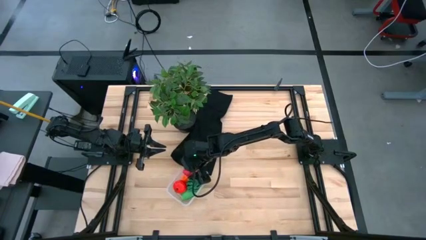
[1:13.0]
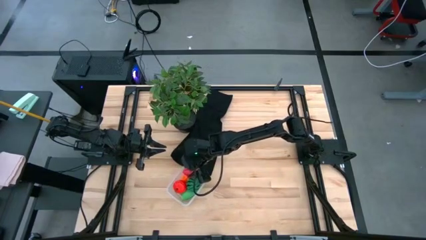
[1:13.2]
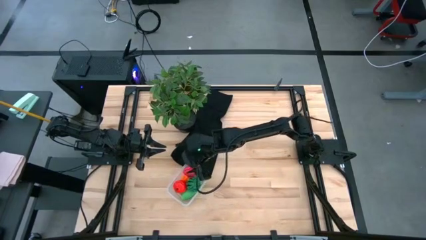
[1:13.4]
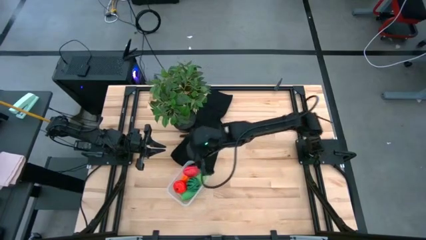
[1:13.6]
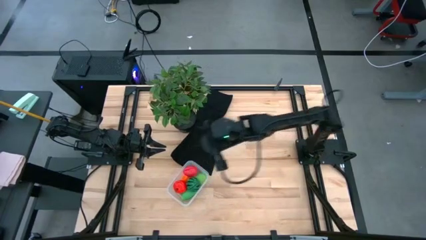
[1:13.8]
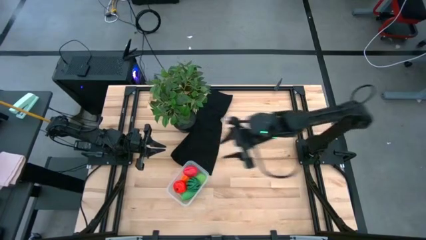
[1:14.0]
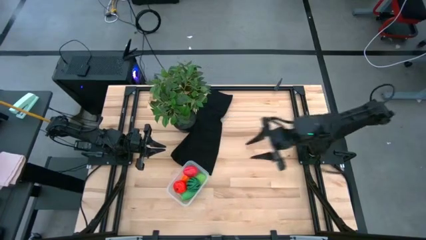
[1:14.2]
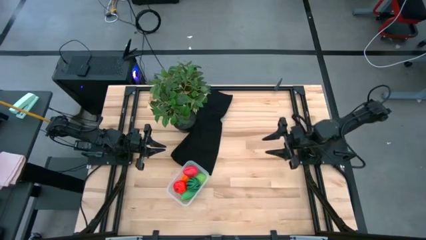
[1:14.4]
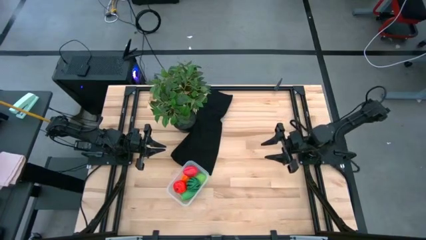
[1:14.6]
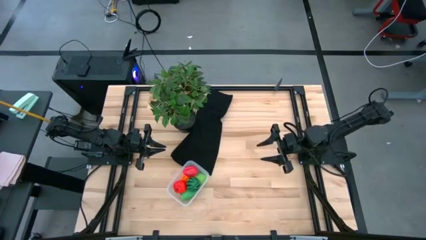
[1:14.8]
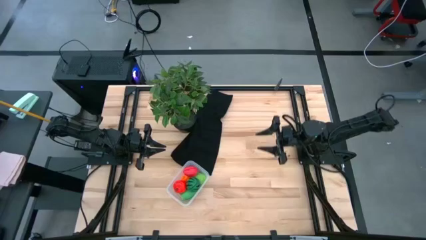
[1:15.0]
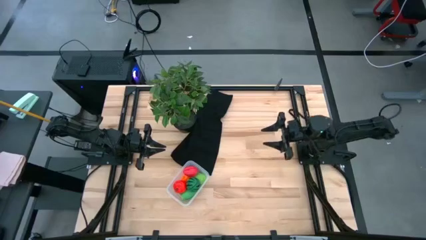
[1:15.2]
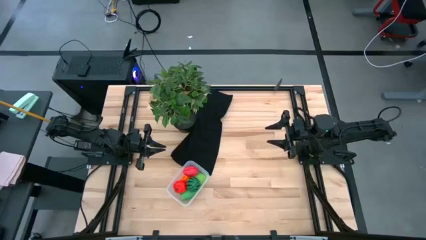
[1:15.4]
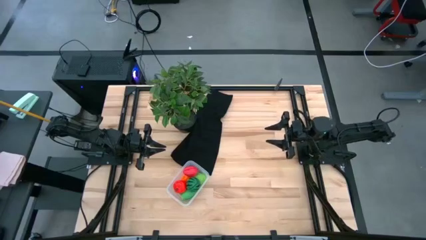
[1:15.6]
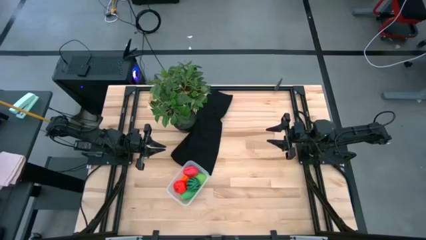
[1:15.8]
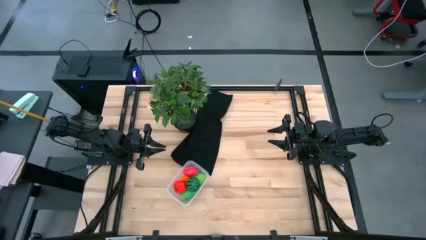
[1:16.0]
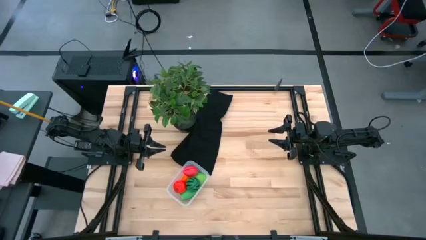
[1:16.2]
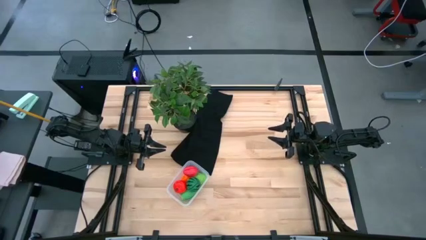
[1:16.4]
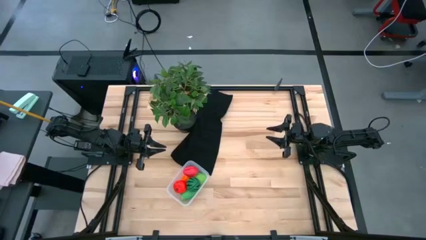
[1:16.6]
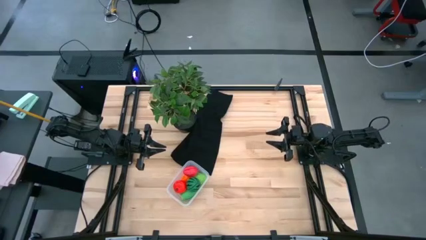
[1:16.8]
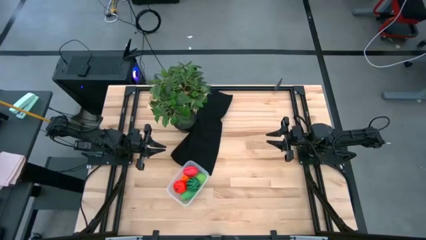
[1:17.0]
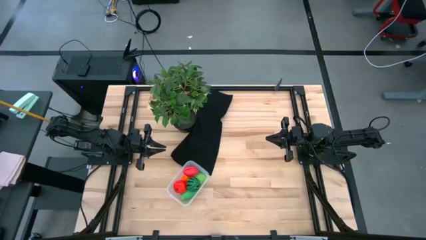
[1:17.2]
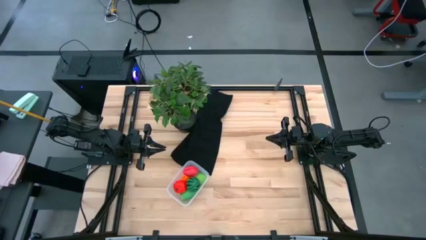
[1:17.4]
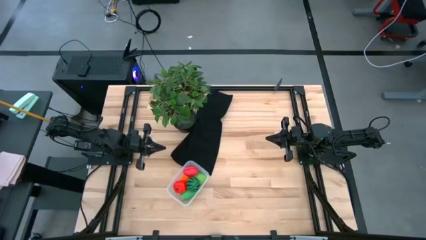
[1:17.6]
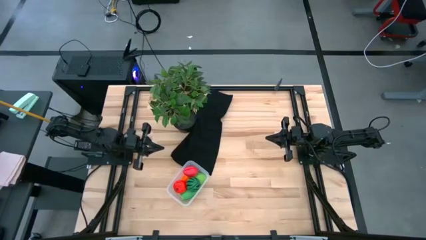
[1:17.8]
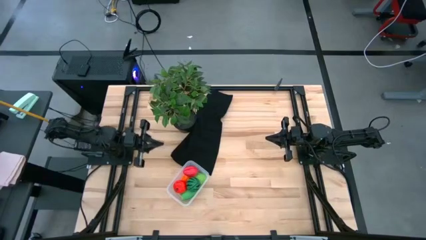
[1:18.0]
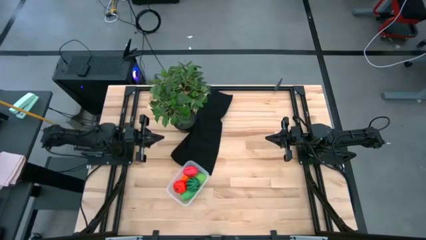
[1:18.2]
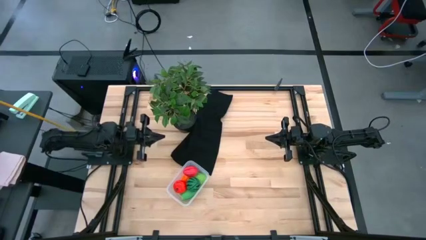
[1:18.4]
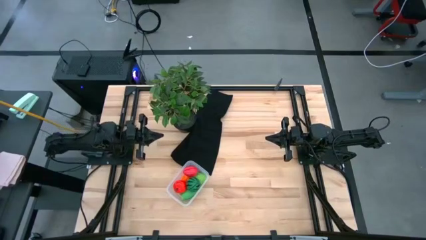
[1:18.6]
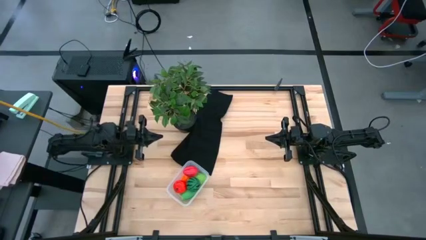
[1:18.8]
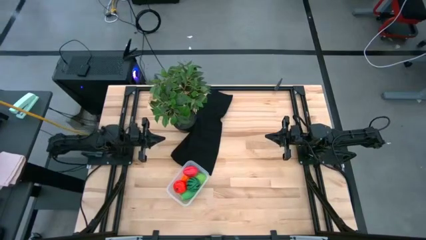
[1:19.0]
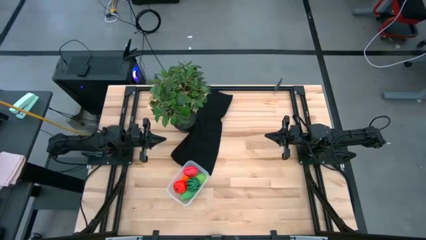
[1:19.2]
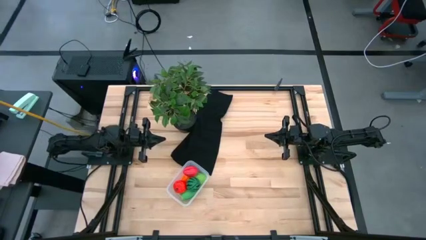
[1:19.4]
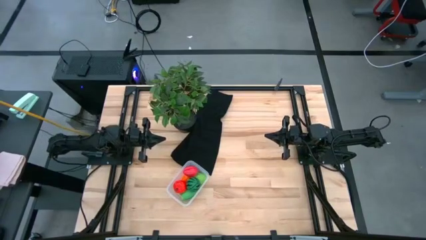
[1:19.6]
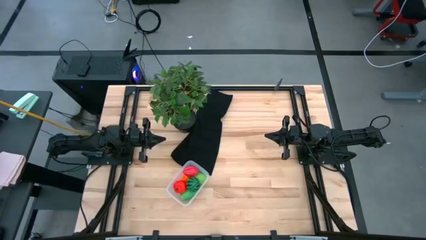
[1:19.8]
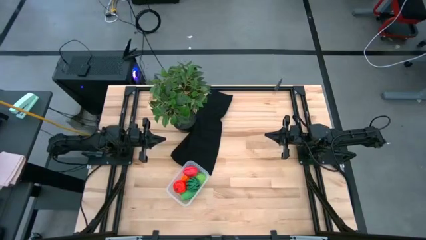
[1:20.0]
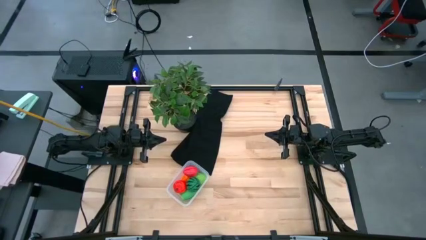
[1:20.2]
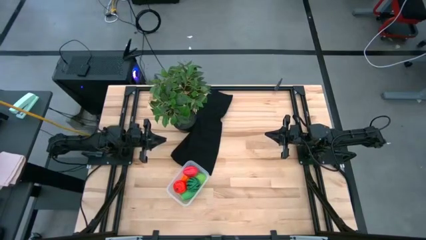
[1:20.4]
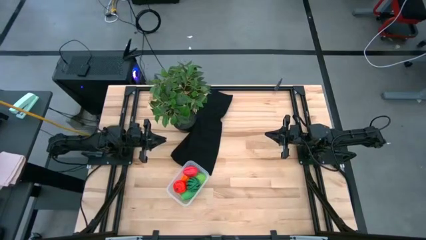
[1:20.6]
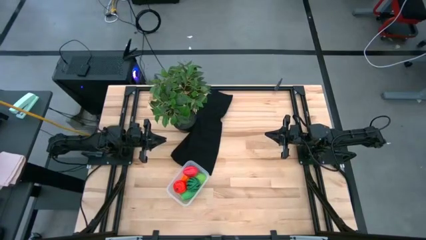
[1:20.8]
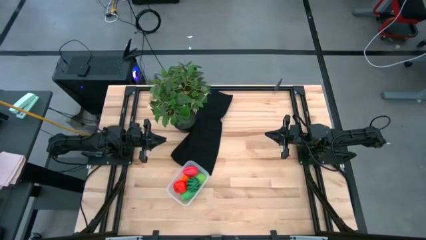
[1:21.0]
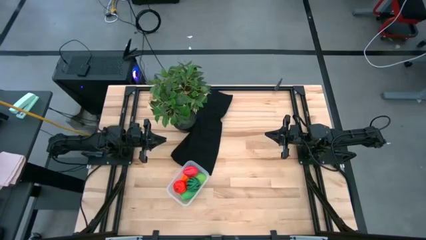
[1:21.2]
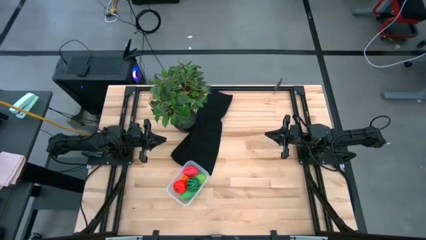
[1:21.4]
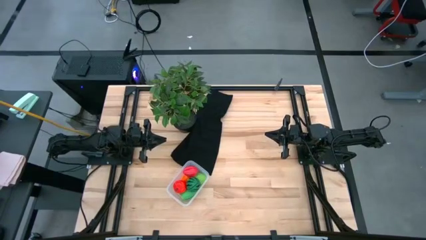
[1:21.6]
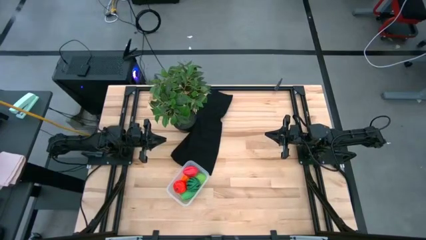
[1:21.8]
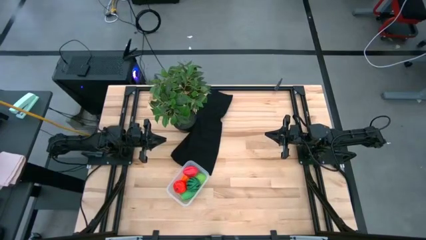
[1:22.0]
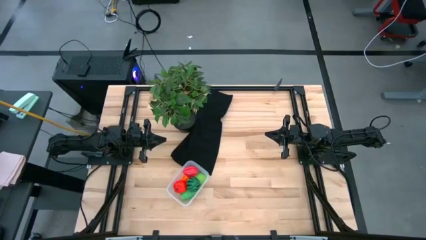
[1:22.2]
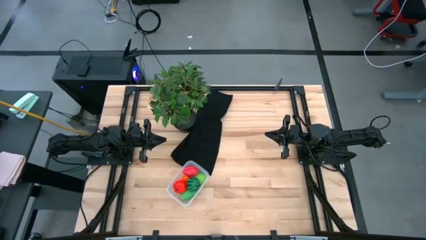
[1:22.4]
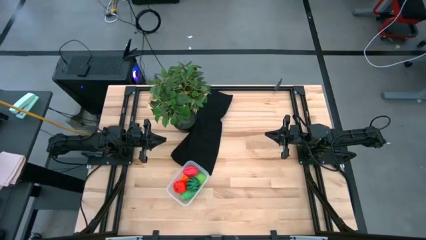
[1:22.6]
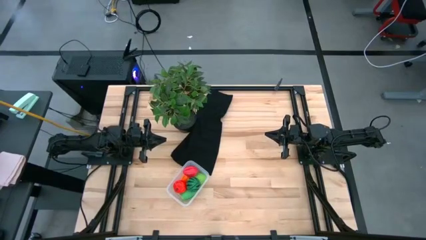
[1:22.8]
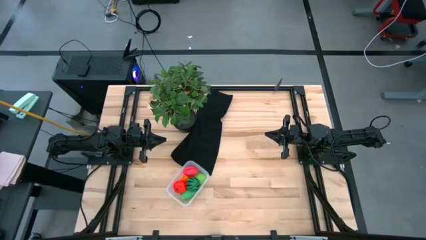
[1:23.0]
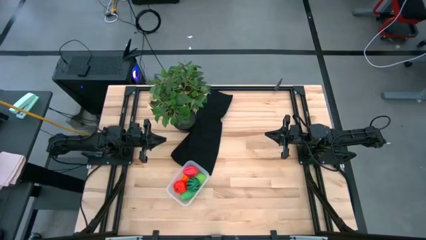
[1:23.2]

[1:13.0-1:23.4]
Task: Pick and placing Produce into tupperware
Return to Home Position

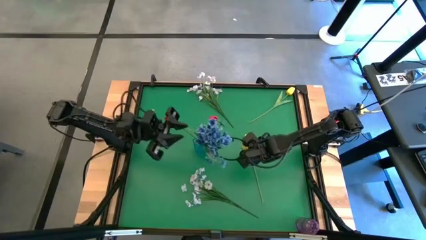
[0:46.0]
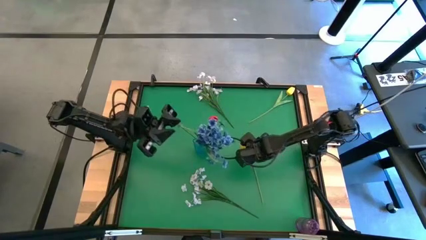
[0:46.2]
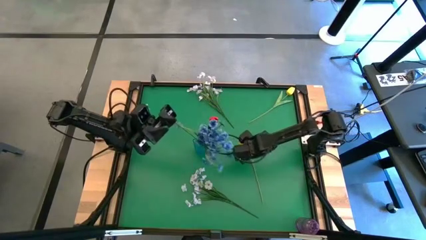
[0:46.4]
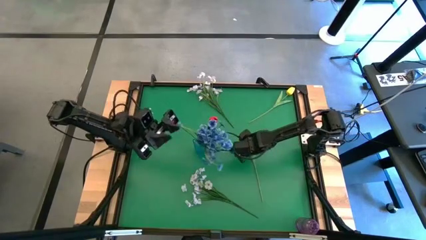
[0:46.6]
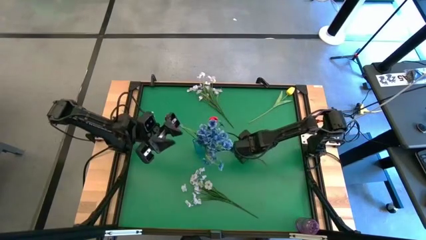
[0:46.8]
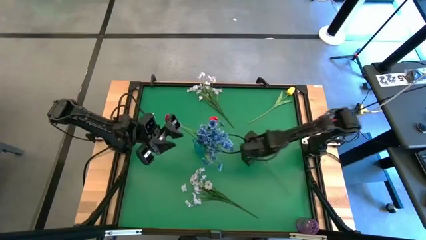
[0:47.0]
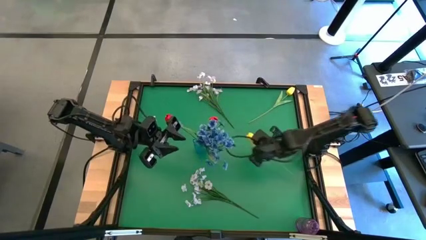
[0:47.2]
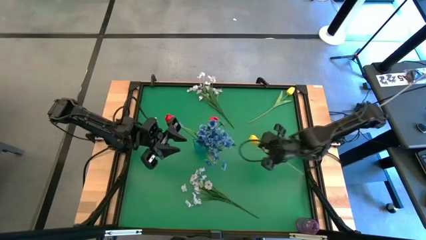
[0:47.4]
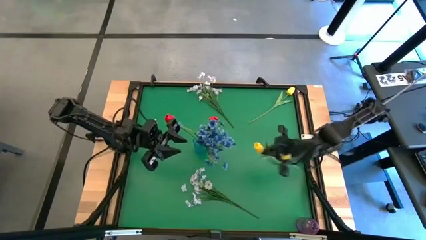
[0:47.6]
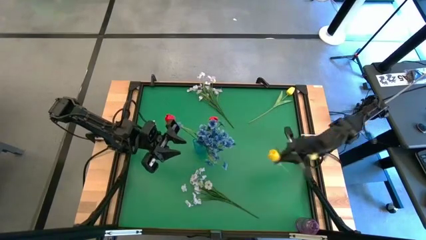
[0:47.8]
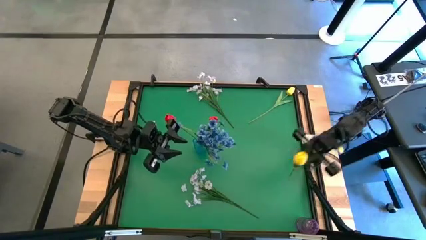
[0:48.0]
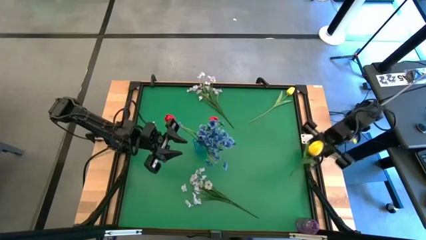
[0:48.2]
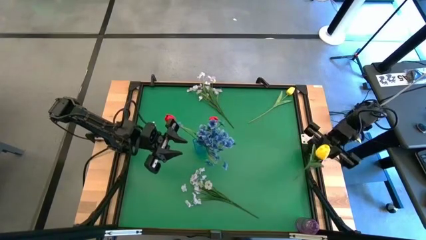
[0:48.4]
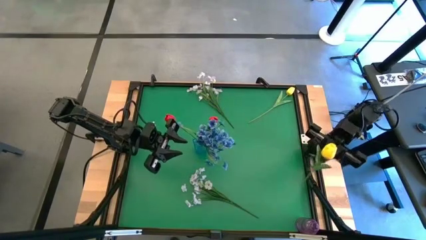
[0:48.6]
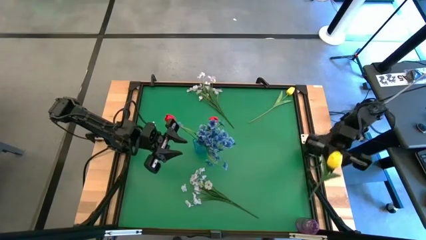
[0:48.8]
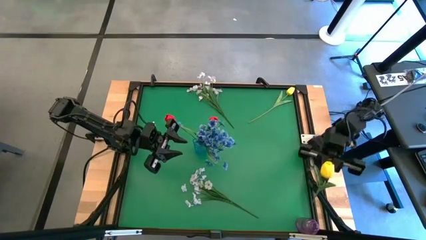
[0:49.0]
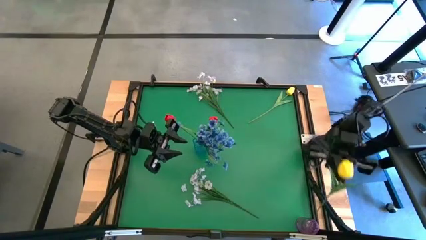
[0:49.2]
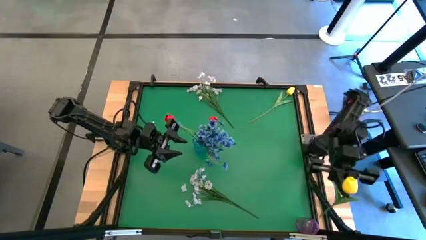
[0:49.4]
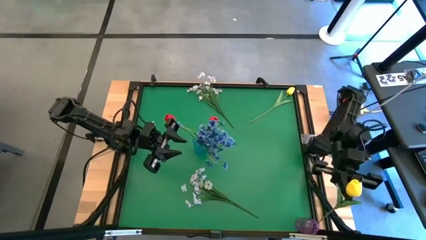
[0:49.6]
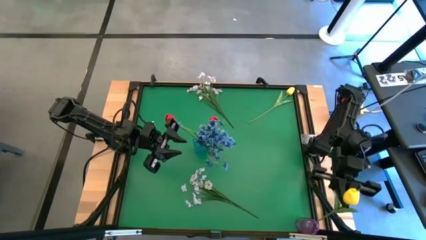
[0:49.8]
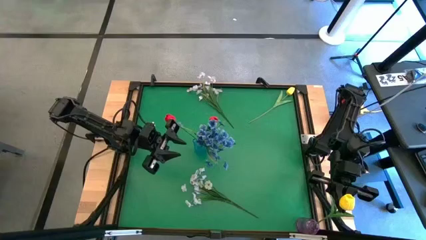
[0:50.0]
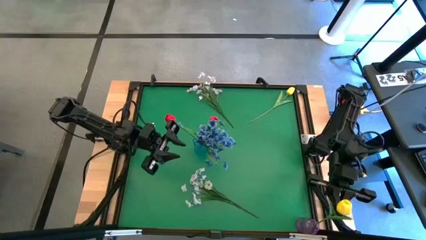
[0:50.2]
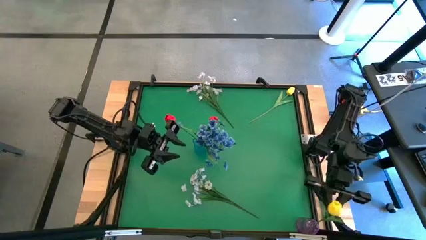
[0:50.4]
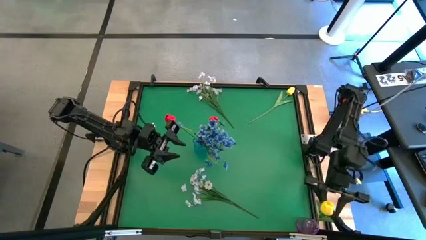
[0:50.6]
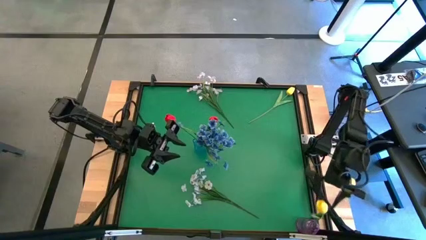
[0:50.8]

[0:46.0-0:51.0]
Task: Sort flowers into vase by color
Put the yellow flower into the purple vase
